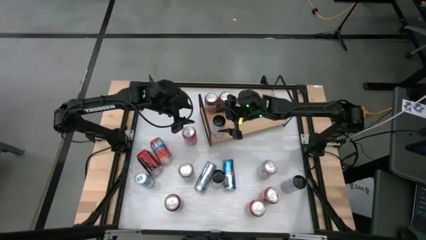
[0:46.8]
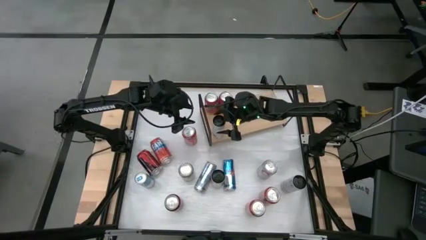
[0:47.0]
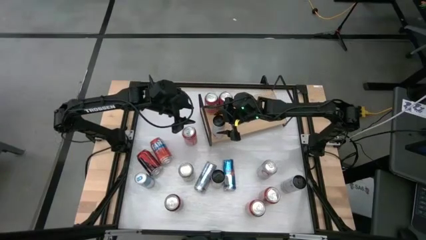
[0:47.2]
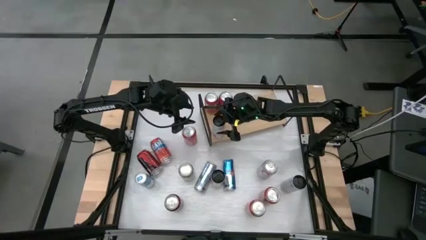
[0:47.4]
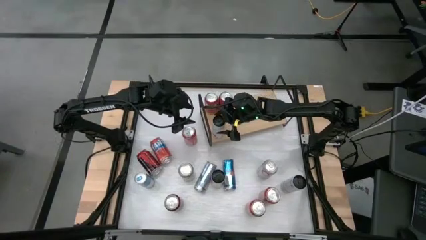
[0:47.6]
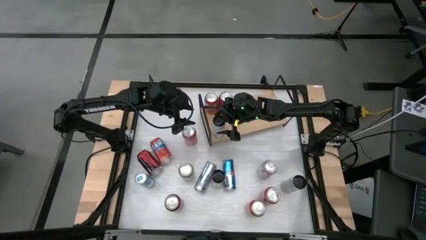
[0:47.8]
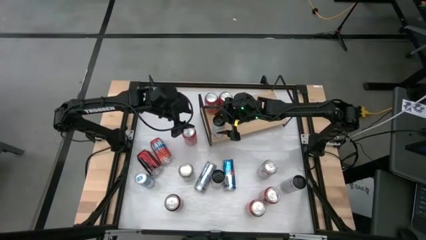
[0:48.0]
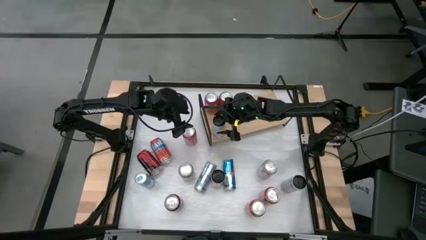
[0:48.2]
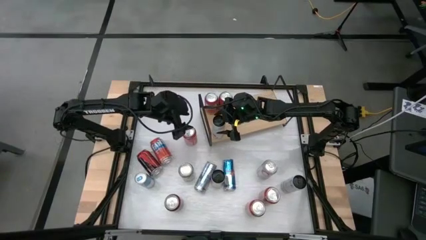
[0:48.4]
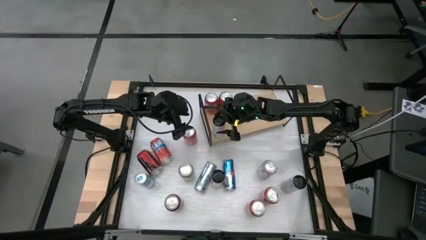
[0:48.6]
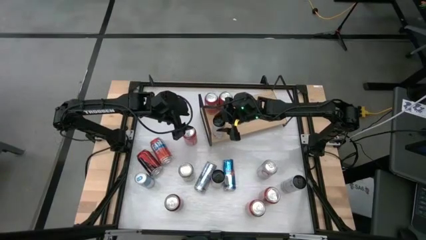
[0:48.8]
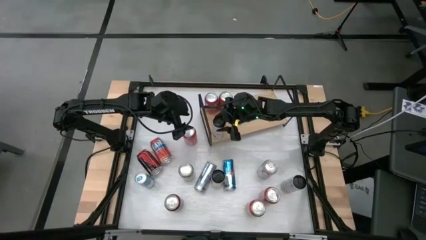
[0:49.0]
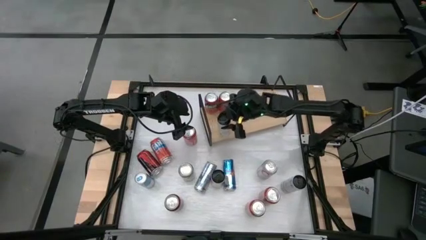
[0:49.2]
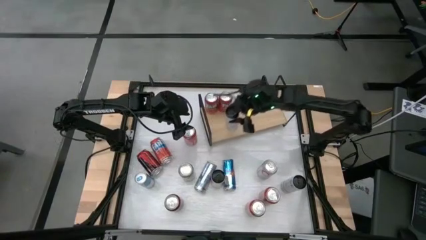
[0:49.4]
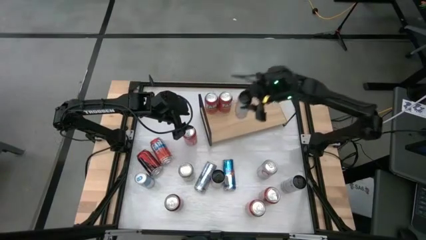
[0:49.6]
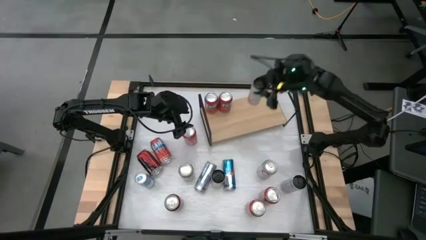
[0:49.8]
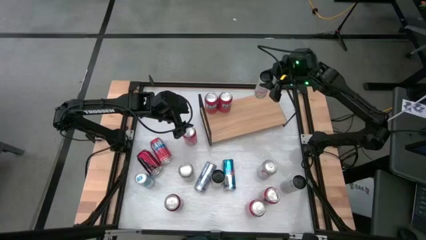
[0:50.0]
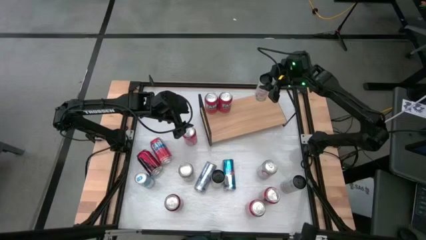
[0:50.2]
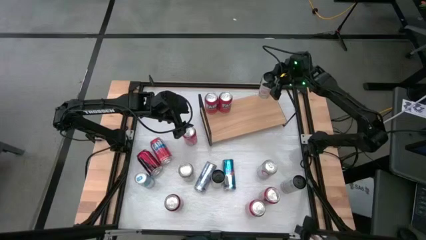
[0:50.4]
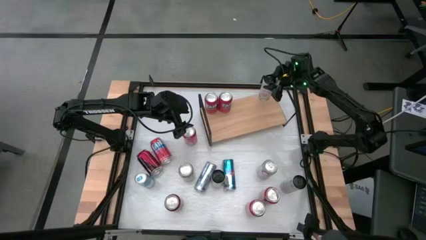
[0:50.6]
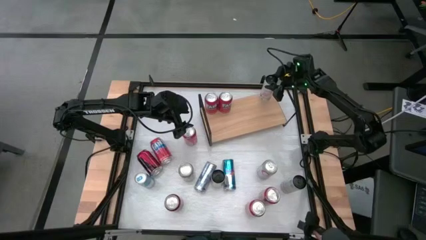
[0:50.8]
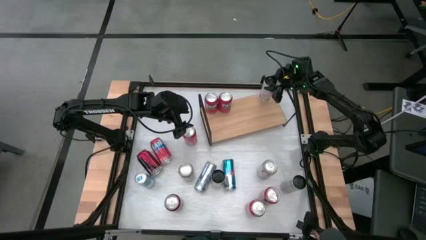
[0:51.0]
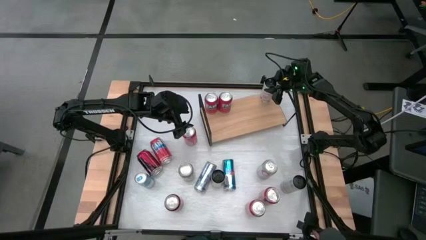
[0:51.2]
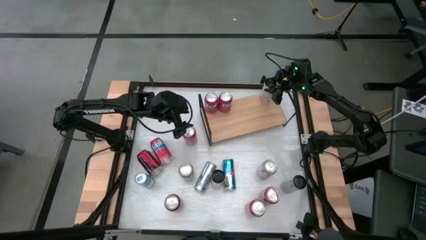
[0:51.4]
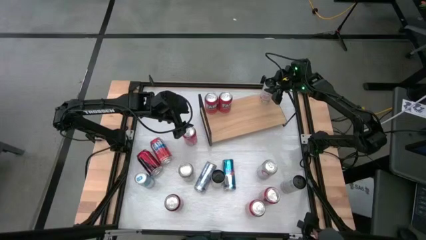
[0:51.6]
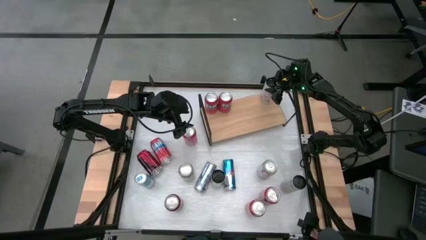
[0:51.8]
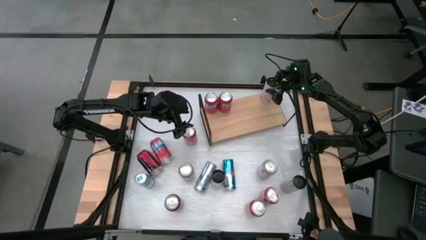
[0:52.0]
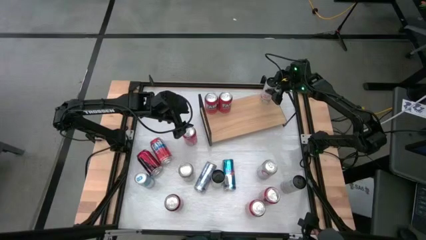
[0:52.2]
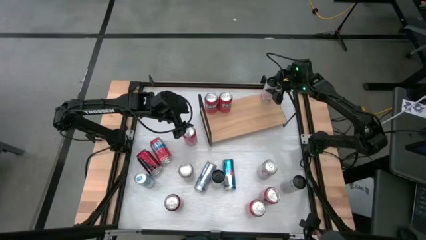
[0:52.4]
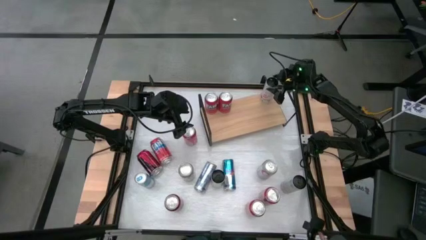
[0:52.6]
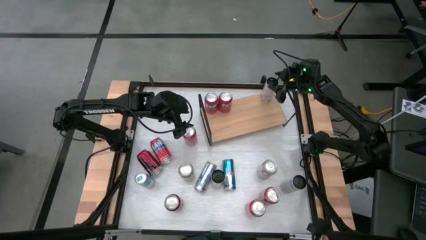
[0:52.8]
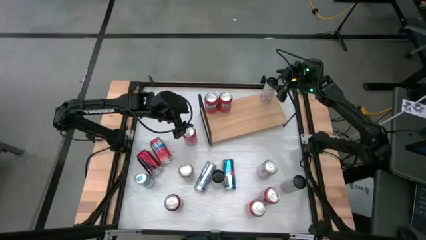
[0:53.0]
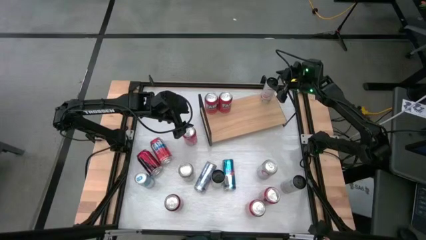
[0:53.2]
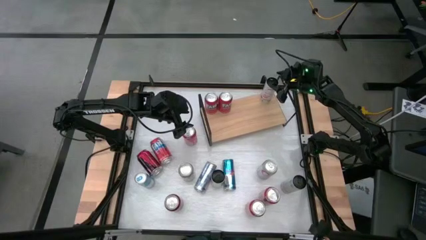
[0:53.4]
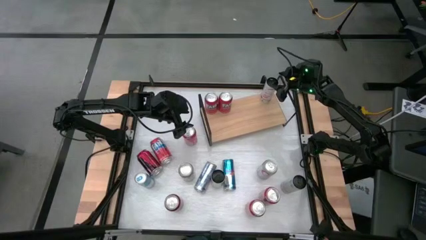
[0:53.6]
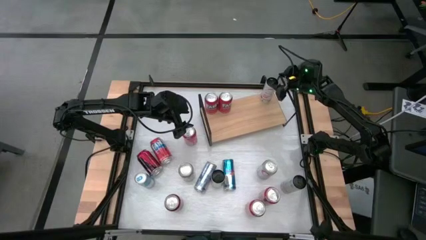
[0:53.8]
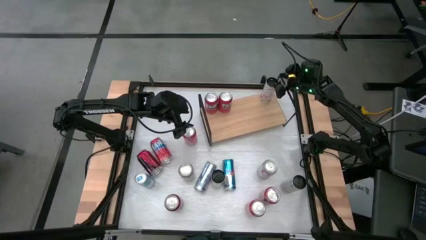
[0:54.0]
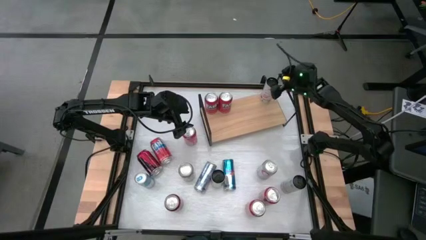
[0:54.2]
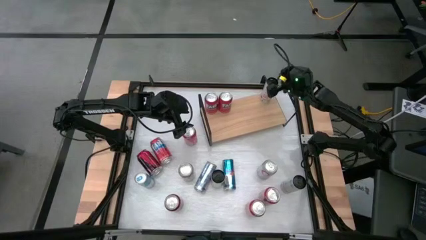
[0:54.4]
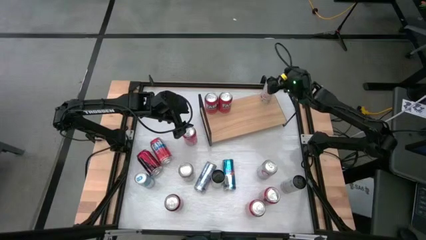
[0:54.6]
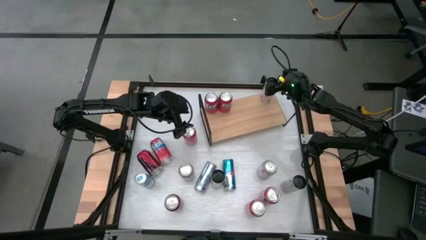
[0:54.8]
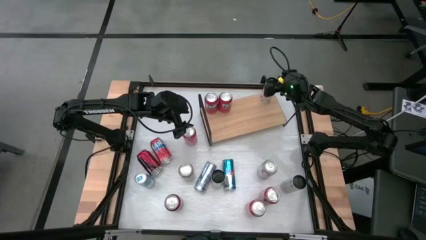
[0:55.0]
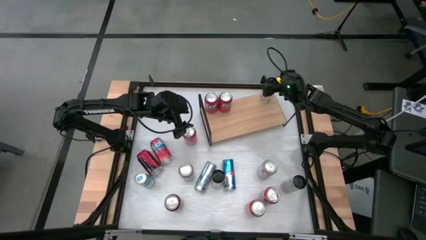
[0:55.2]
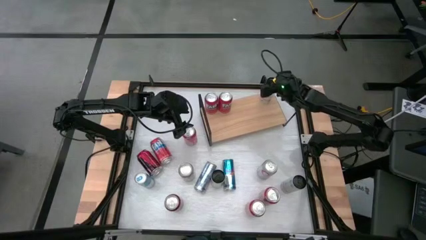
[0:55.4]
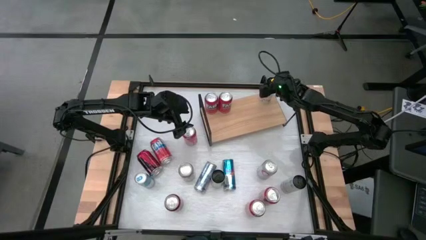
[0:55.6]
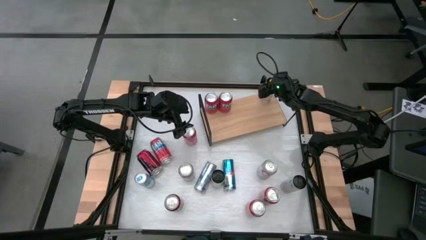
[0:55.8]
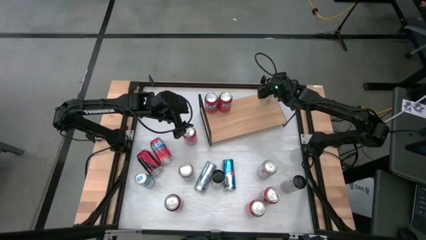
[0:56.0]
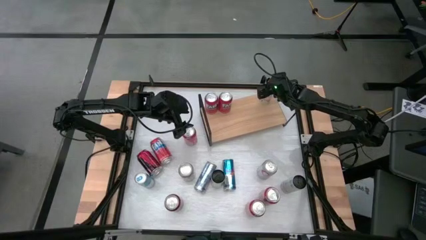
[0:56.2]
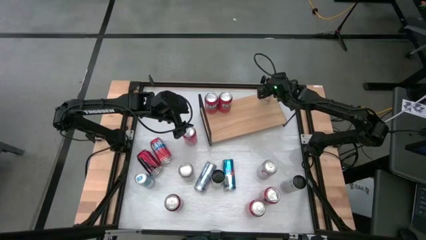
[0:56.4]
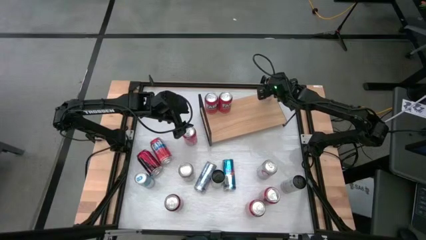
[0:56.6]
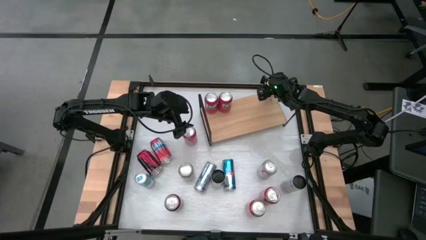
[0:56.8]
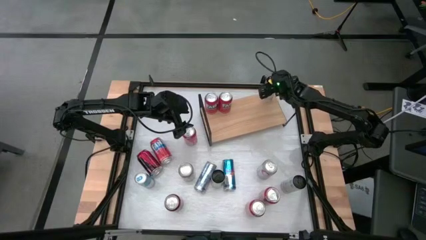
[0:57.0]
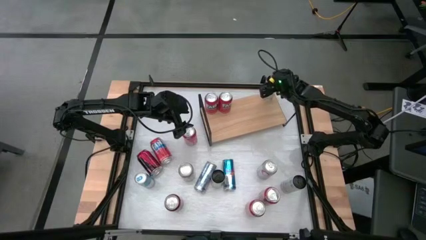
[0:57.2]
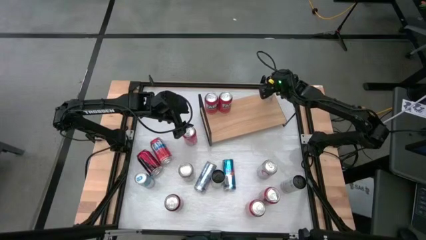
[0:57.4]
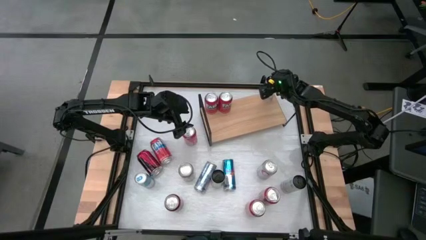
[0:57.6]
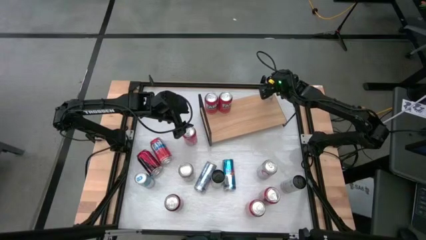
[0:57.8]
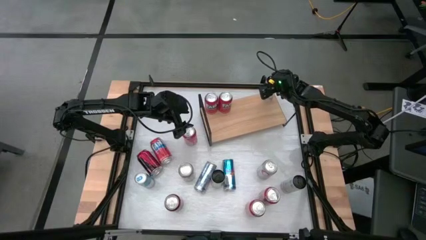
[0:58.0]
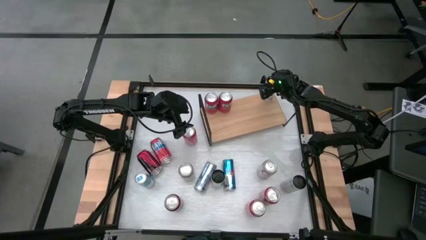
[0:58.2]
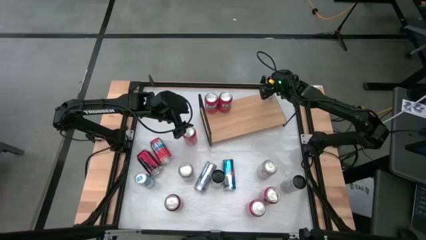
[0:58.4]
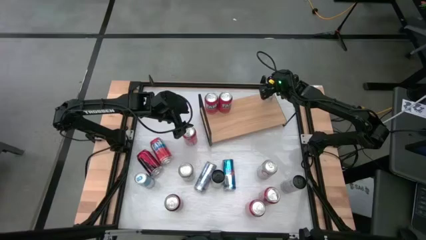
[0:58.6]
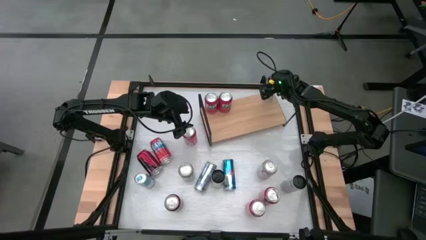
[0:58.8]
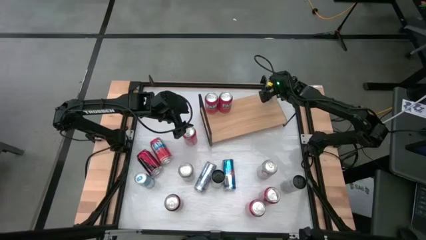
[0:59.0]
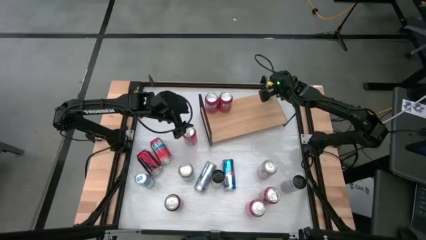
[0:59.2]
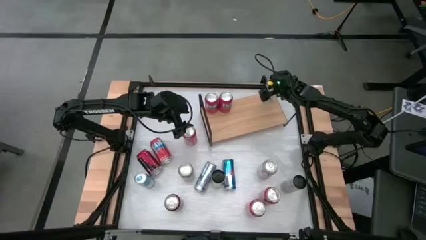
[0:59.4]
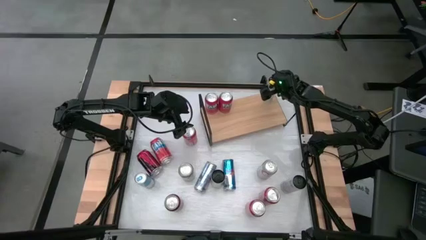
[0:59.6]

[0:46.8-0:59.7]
Task: Place canned beverage on shelf
Put the top black soda can on the shelf
